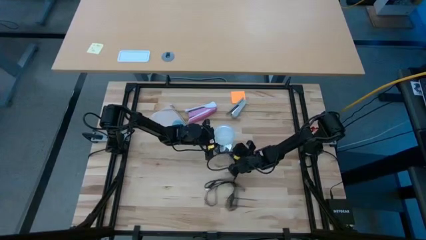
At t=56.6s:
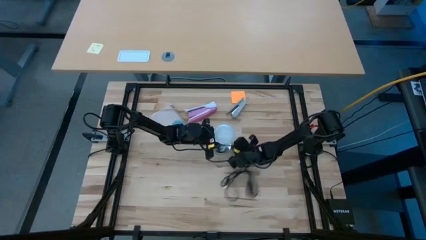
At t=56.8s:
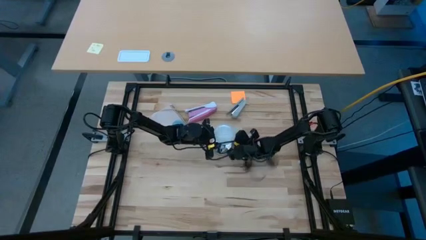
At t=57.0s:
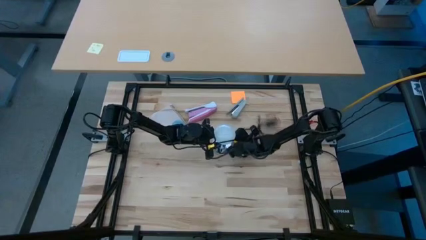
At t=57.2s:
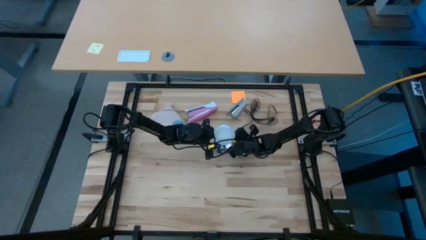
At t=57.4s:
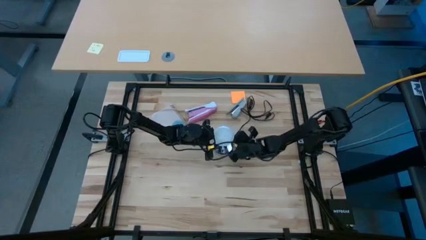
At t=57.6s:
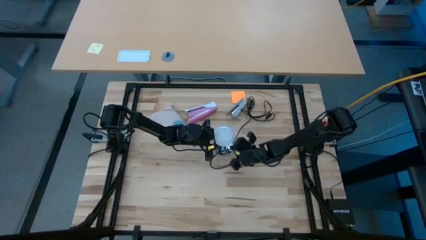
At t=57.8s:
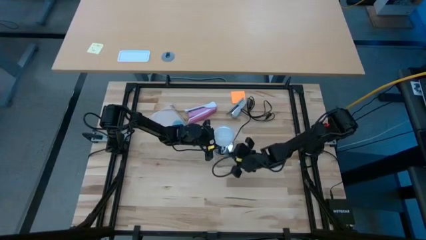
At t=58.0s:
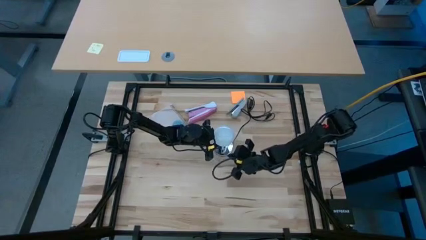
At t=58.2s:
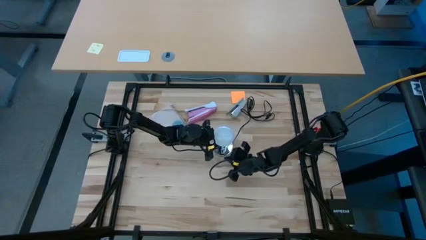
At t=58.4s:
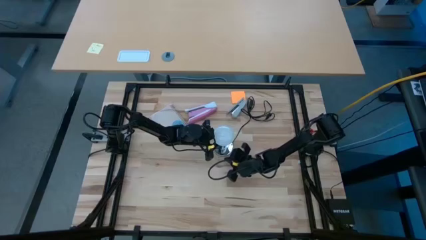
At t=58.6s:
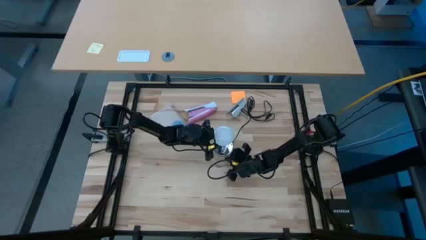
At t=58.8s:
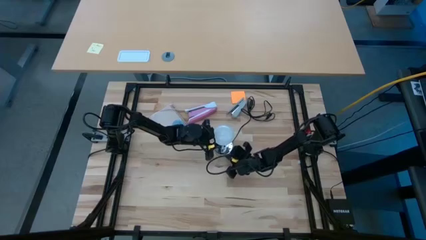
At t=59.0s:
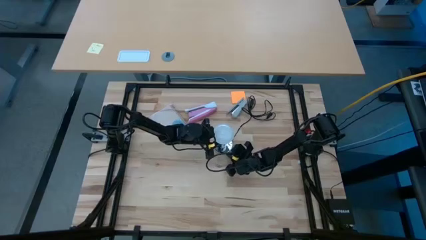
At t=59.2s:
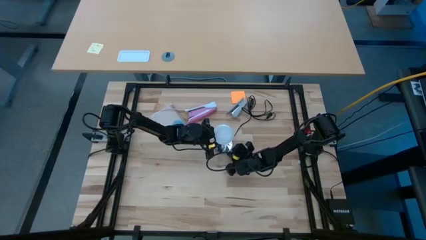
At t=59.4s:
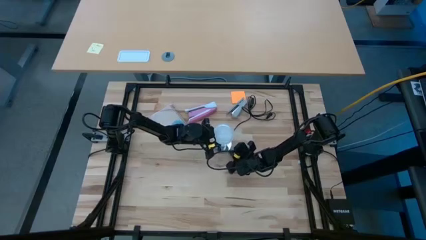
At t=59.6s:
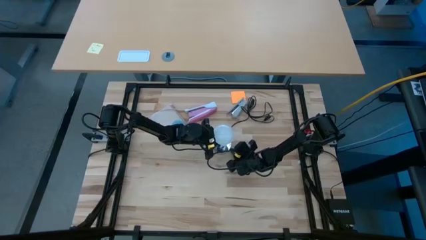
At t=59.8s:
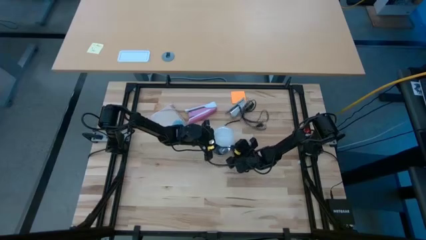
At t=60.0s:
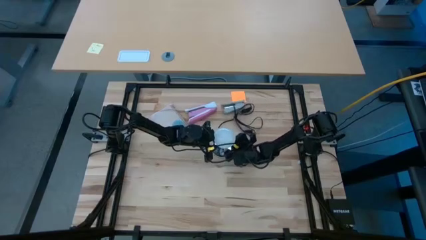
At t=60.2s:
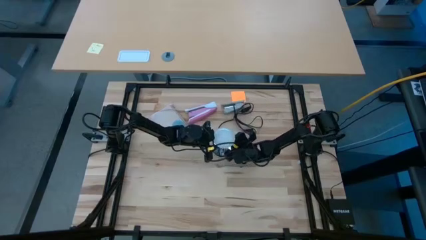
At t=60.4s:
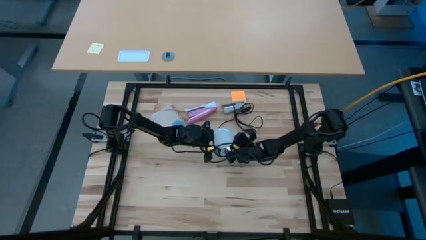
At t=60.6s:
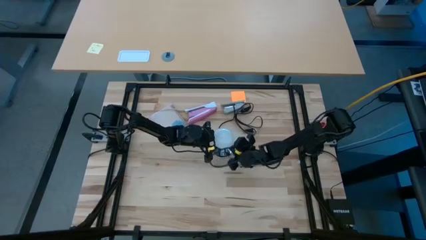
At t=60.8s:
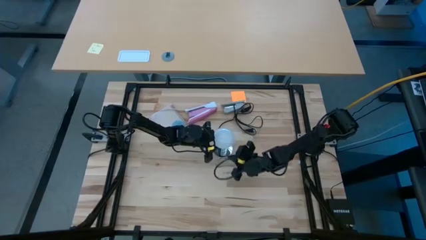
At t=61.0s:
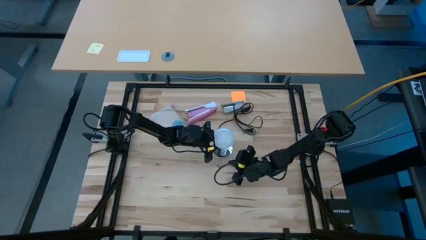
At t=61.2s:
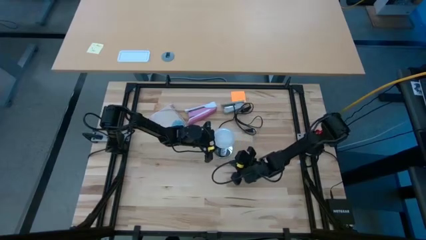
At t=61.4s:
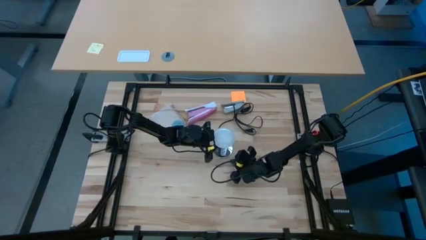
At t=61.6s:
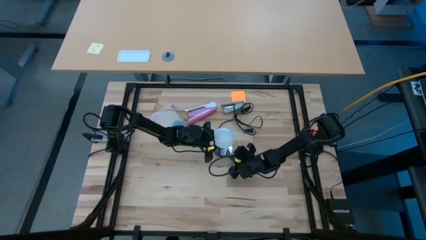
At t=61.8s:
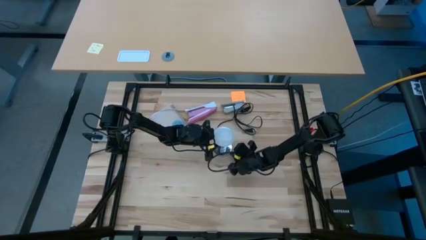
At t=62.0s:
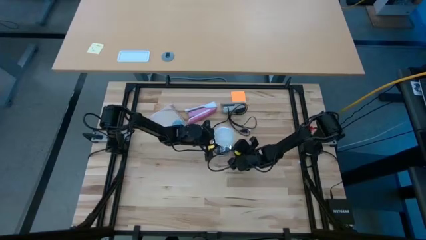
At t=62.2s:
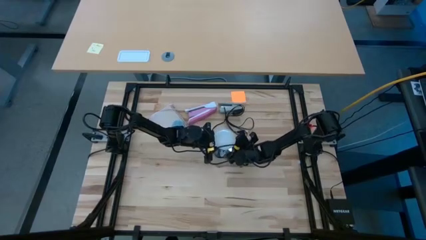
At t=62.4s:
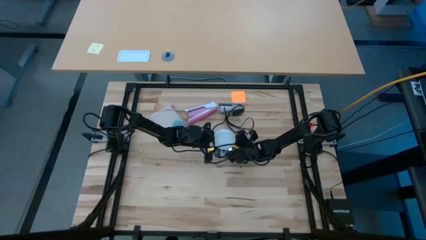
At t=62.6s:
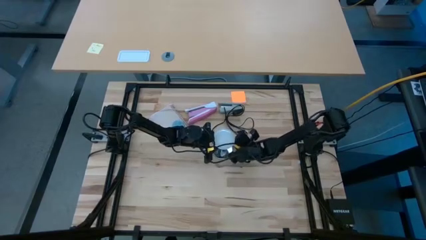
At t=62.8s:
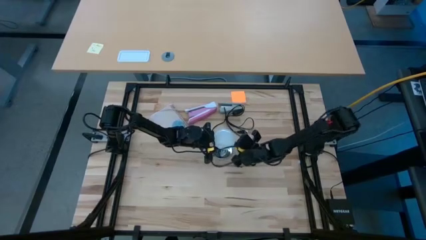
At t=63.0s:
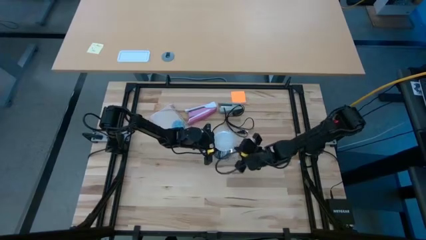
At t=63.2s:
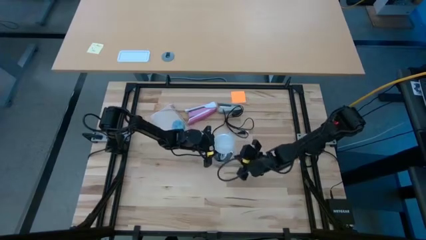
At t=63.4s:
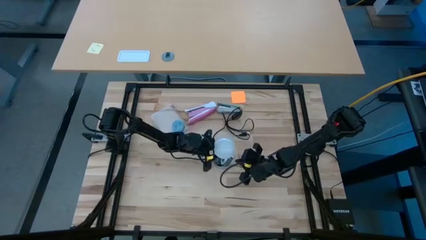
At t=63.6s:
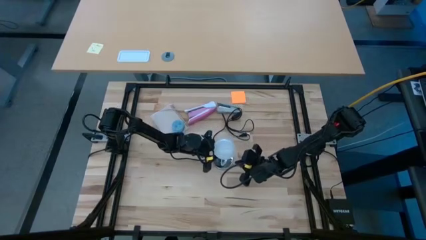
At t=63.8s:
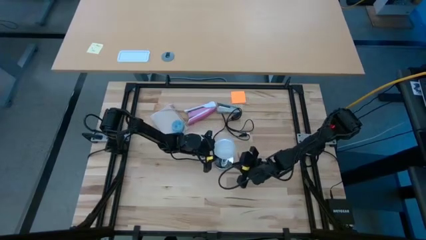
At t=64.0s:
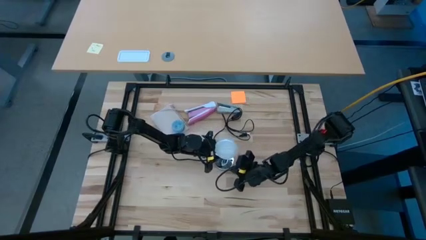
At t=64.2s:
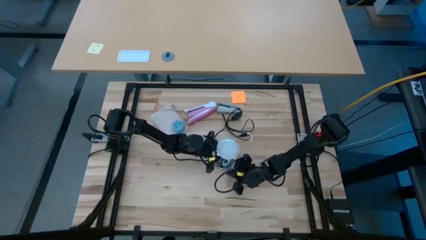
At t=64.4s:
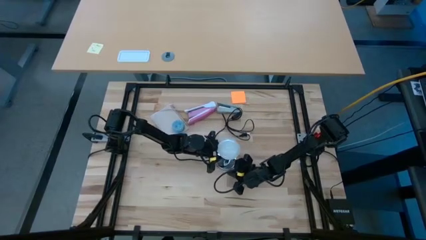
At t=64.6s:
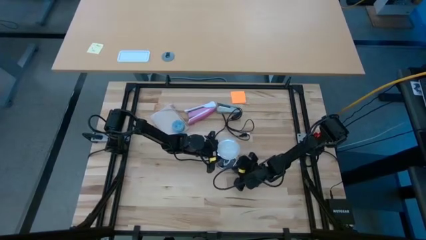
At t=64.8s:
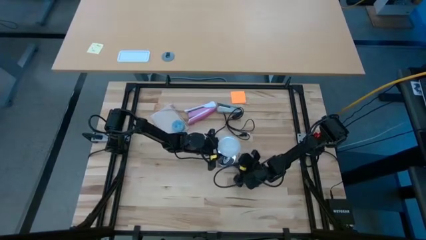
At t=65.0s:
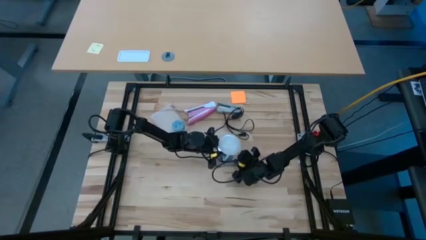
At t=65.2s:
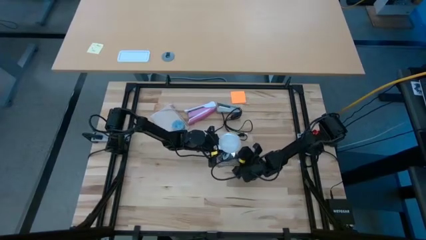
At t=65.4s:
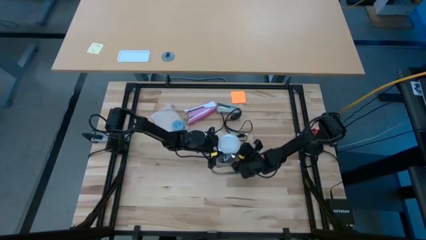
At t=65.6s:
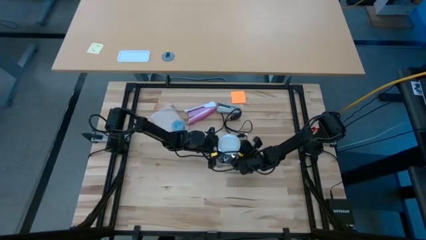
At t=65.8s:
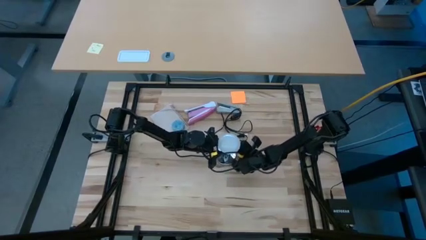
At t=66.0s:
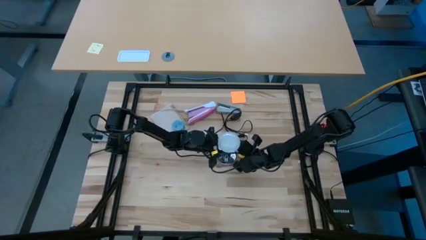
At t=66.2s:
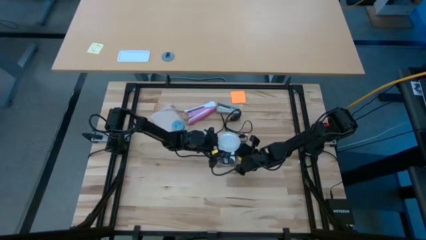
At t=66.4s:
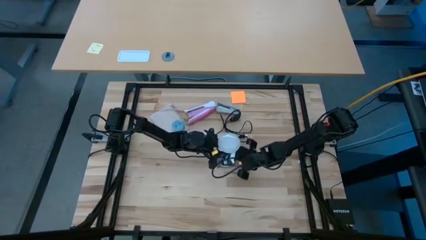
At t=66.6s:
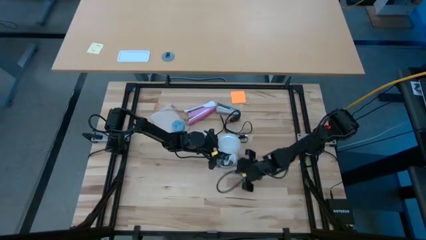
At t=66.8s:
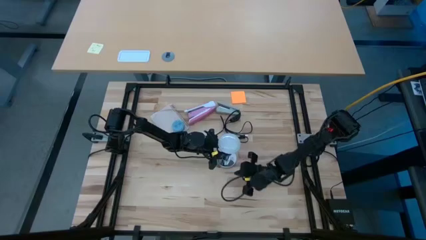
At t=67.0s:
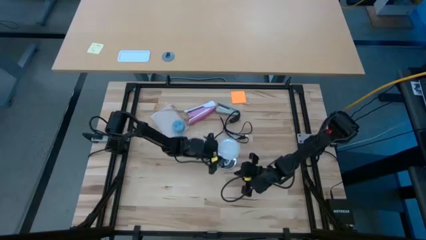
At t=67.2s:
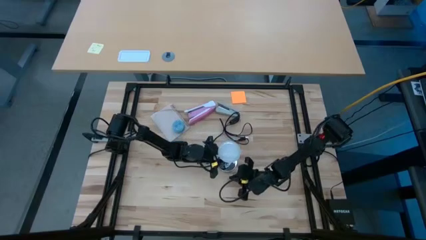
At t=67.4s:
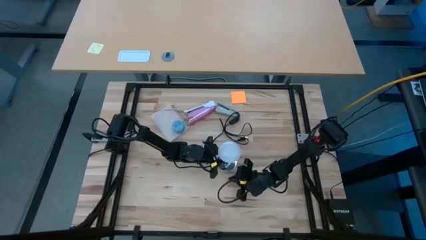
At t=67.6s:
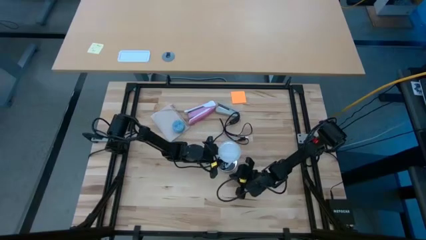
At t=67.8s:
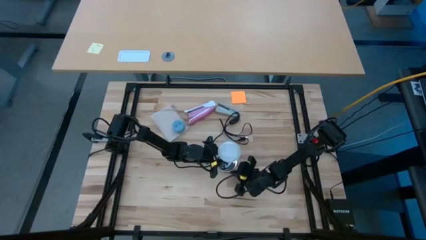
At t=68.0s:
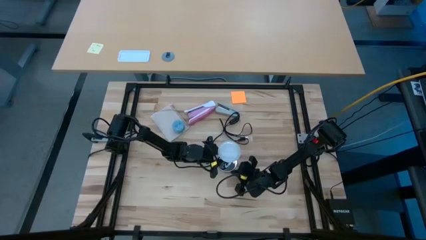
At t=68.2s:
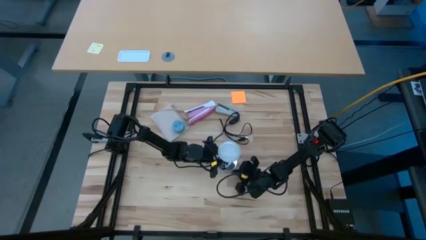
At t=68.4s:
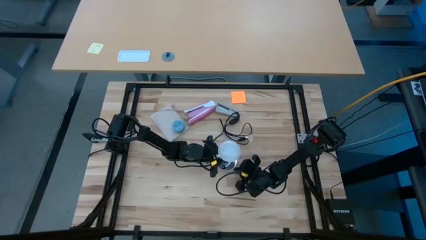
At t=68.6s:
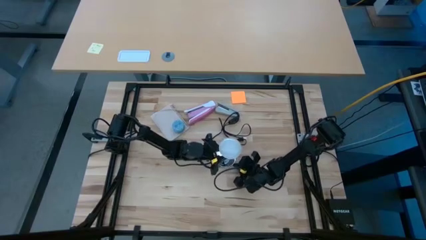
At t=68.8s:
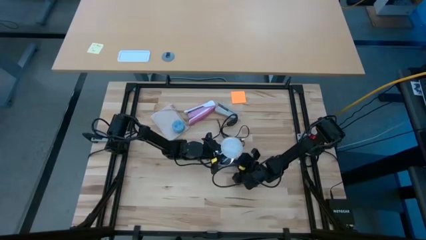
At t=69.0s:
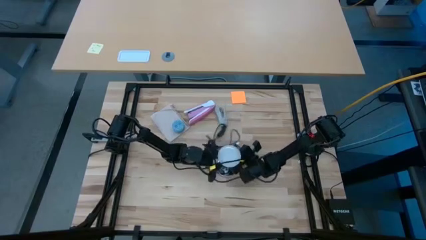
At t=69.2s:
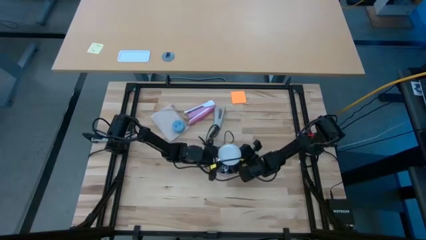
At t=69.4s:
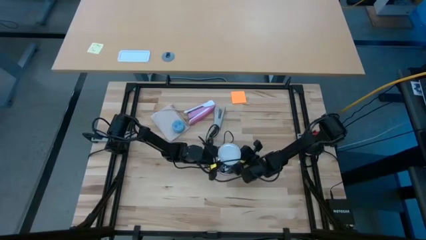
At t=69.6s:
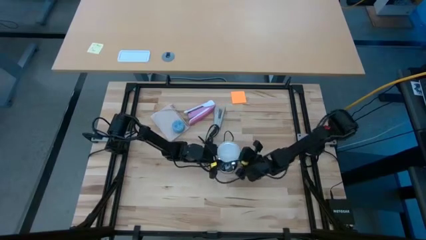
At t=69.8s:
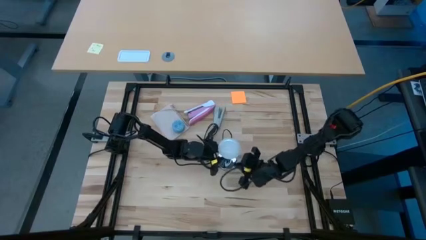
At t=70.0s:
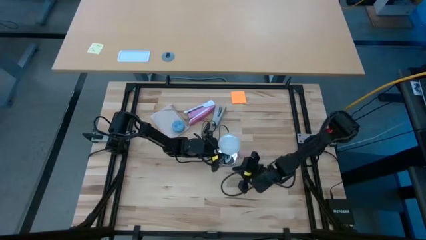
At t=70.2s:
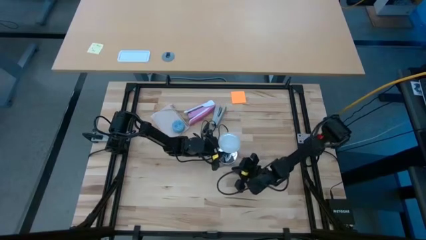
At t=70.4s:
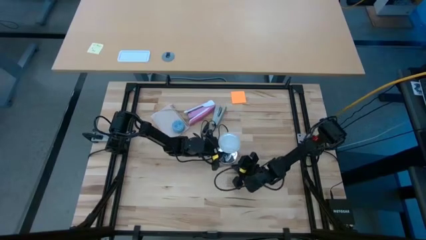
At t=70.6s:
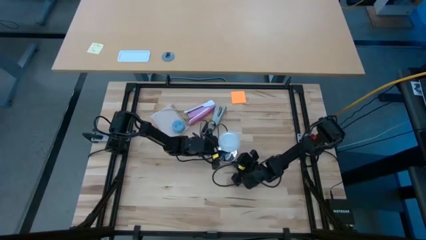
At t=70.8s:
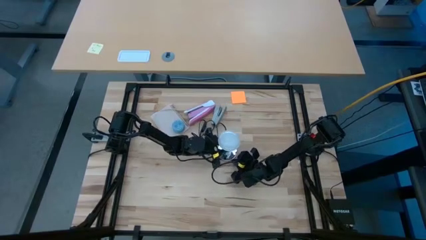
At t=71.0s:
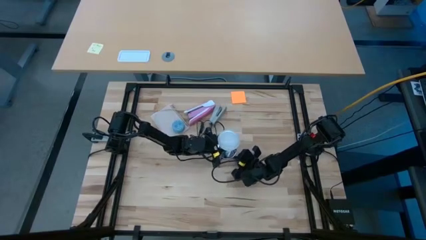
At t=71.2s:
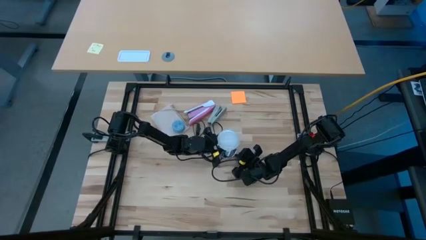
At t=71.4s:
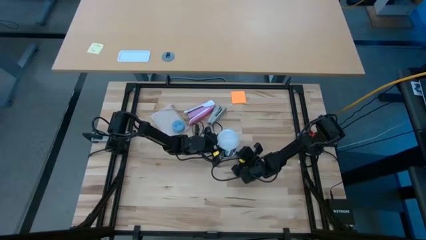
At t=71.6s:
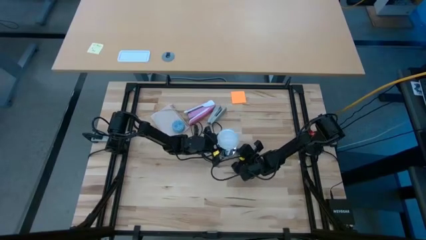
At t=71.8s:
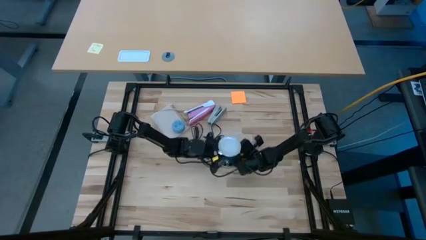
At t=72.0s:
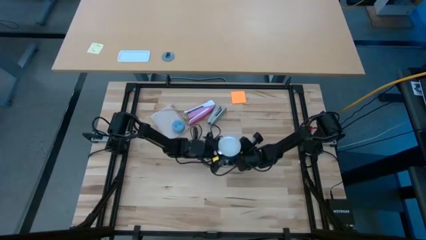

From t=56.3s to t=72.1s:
Task: Screw lightbulb
Insert the white lightbulb into the silver desk lamp
